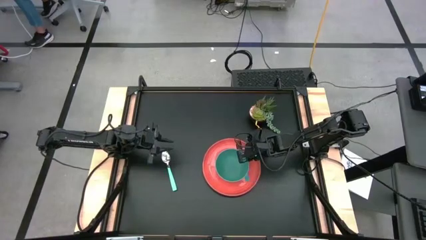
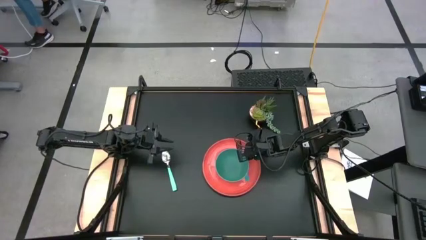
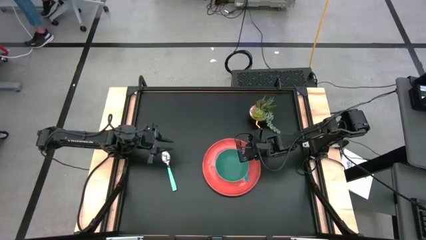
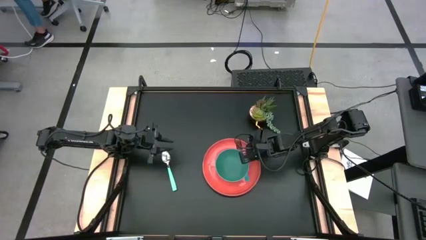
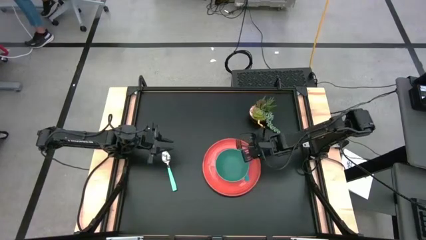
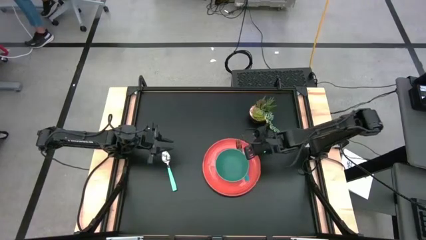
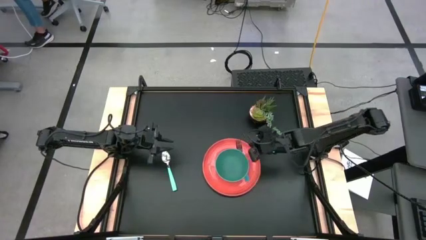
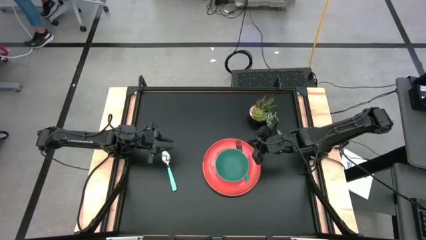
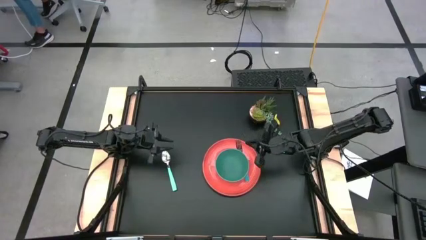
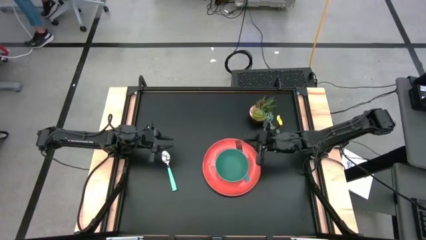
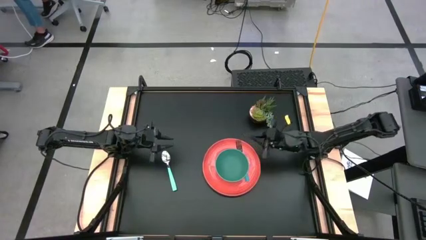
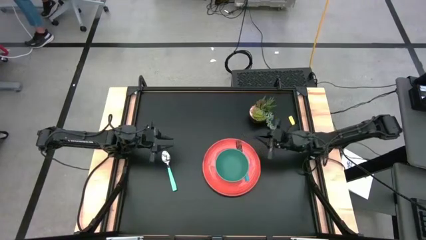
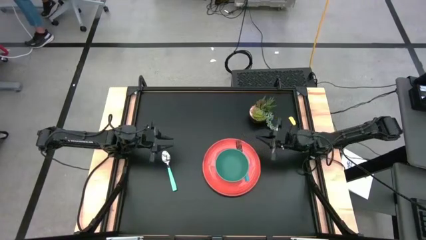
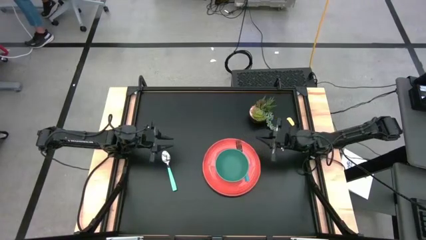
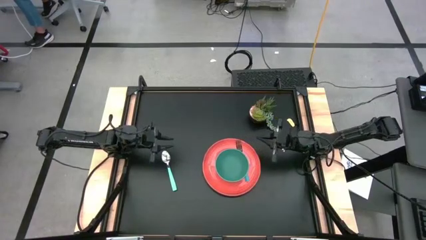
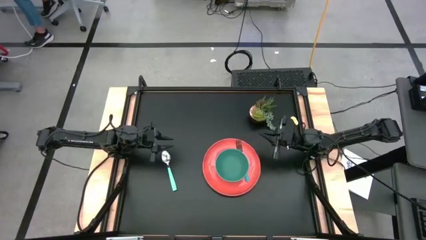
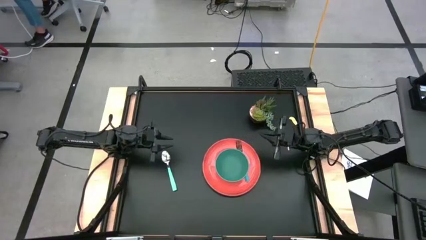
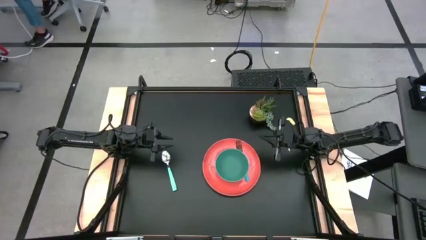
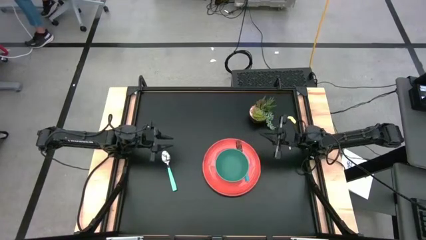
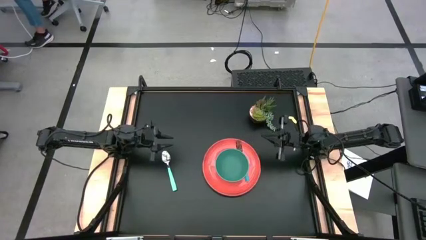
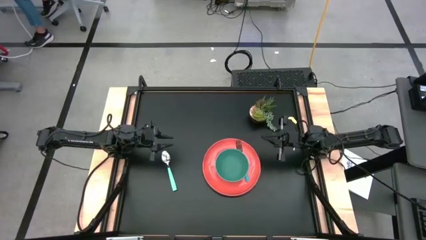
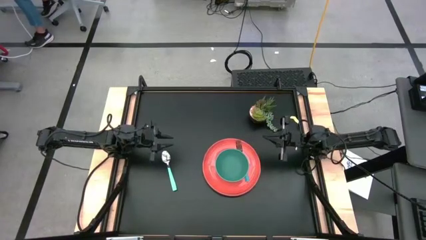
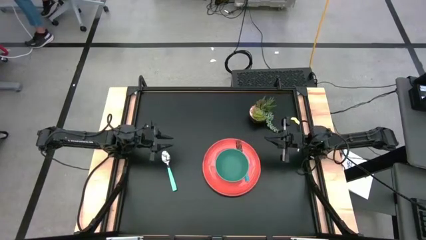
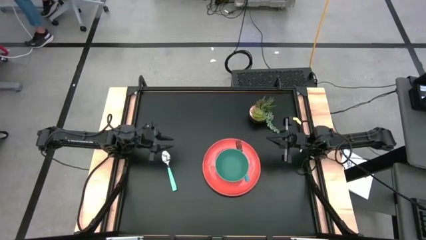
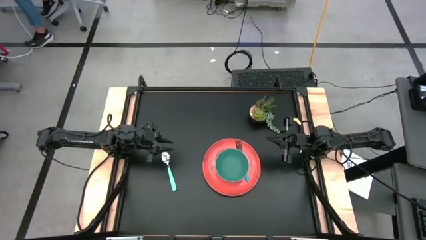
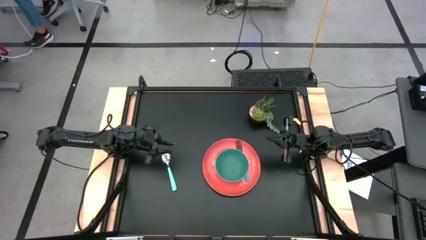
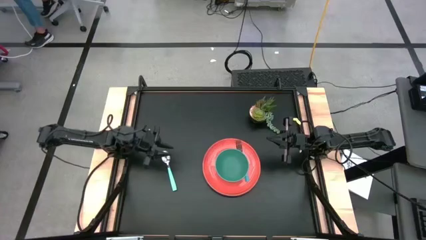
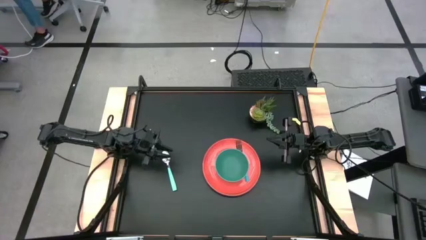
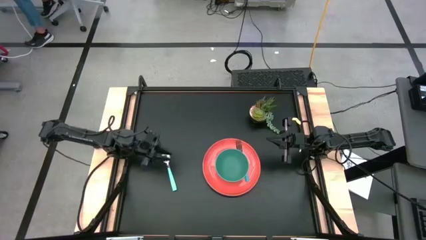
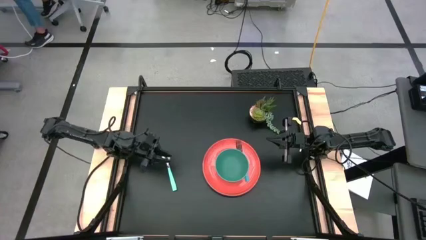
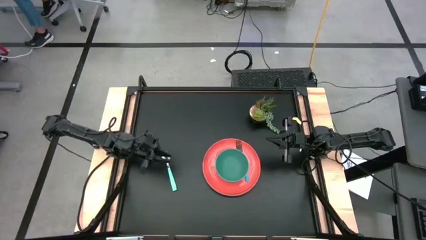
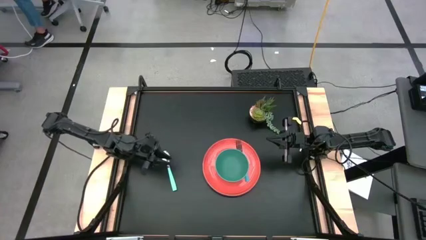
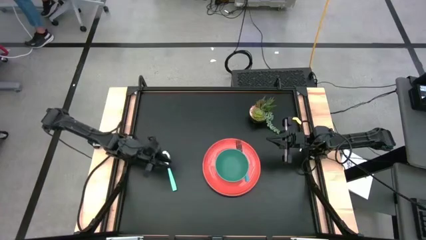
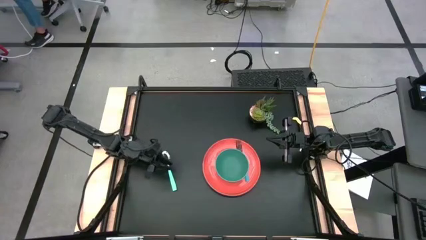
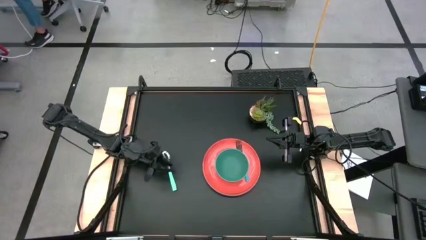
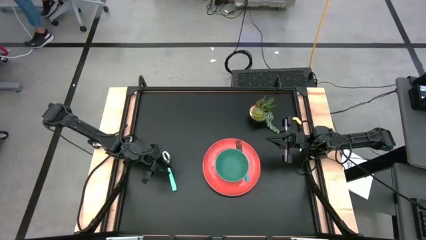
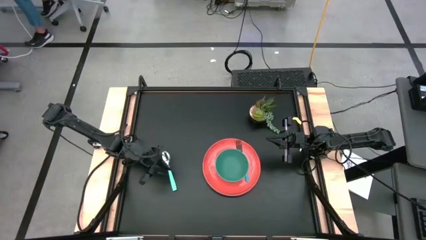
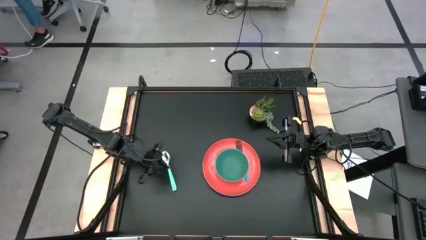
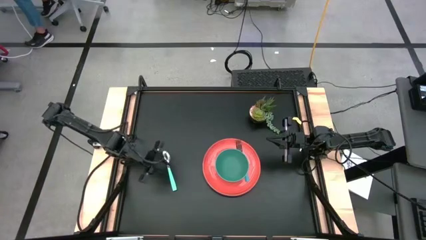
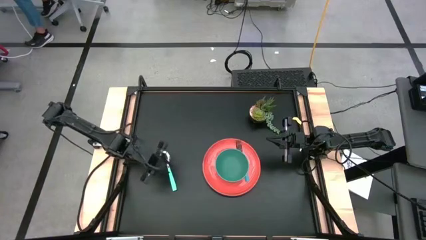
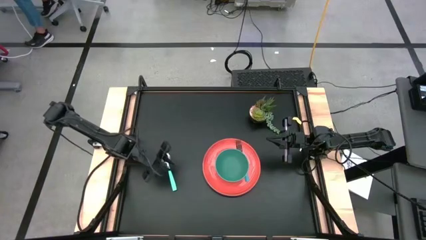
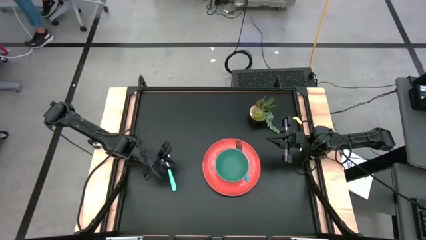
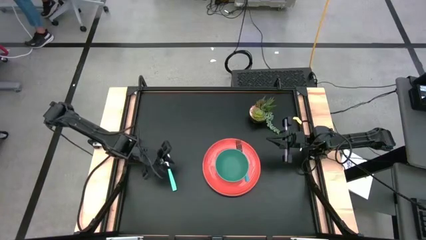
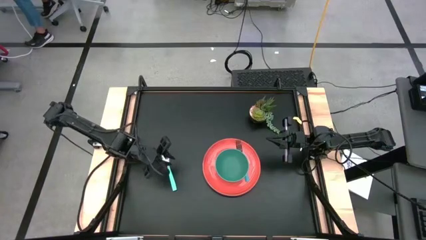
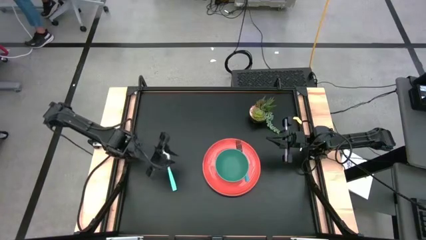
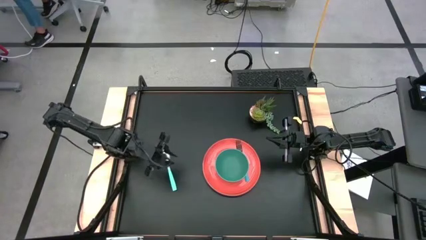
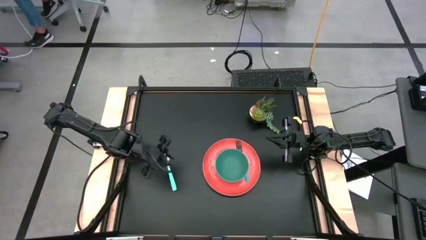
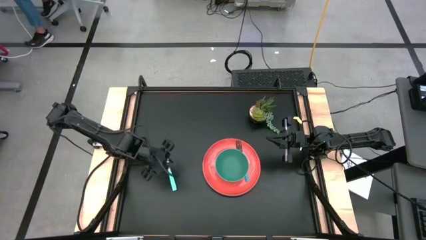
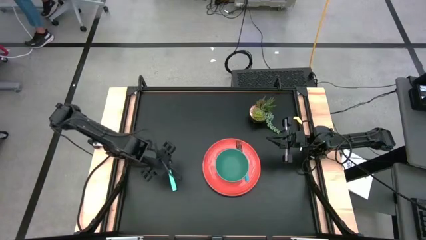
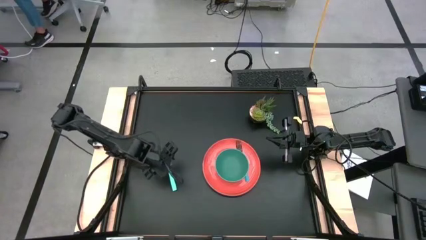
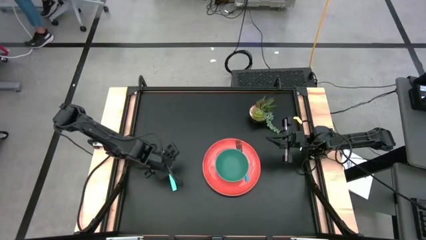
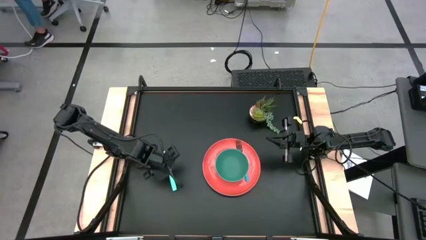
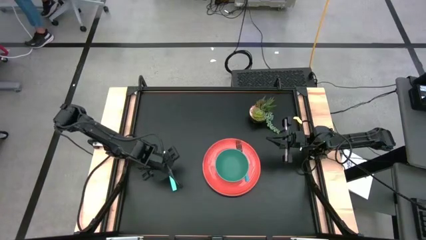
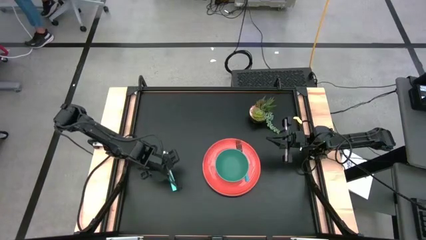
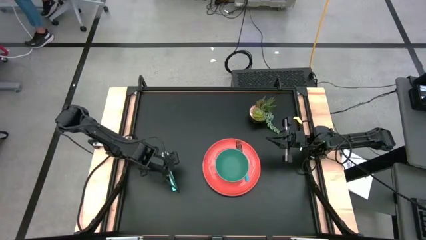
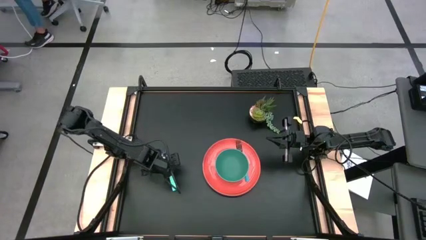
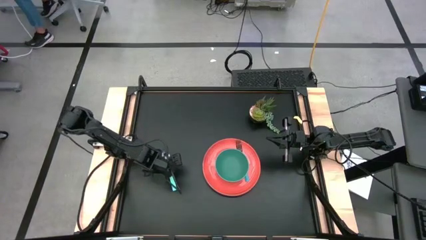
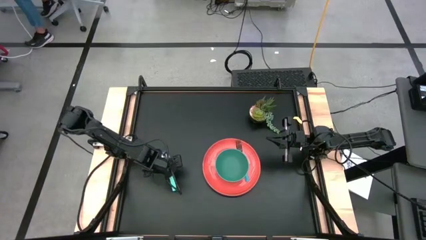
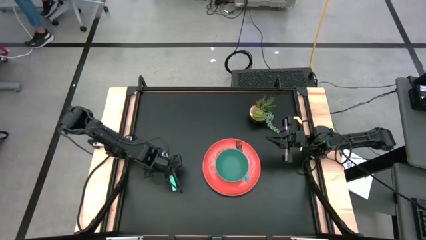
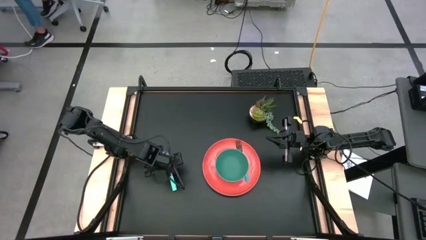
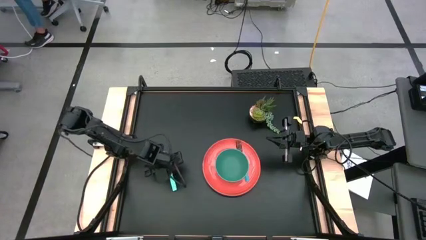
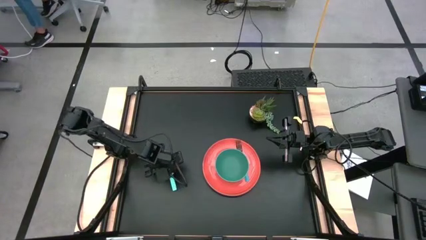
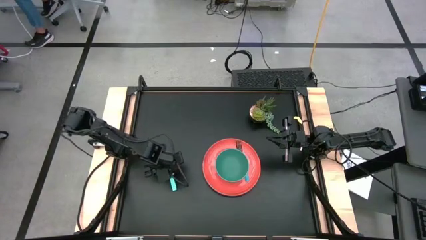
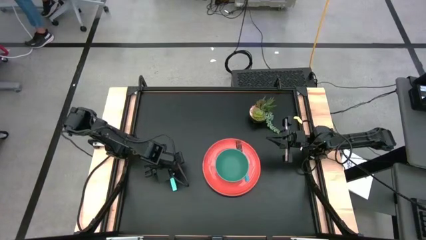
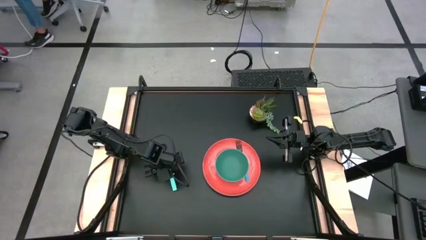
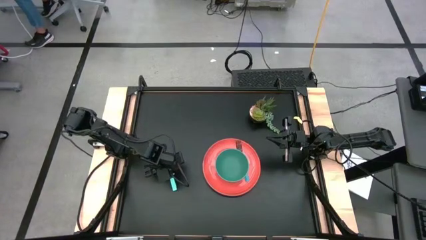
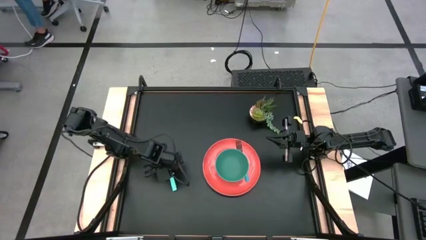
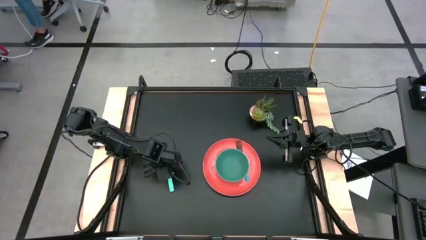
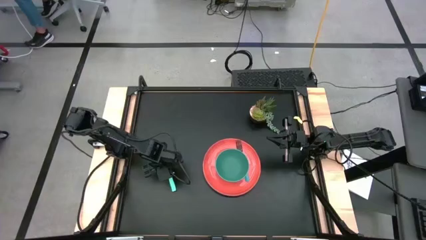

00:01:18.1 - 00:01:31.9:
Task: Set table place
Put the blue spoon into the green bowl

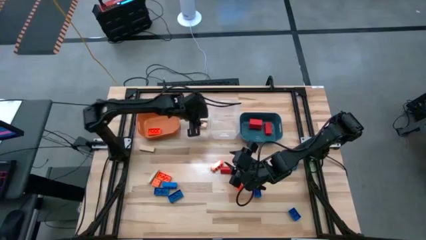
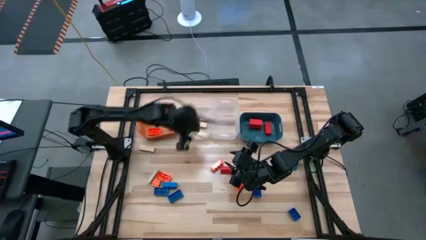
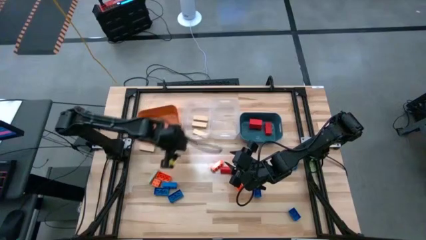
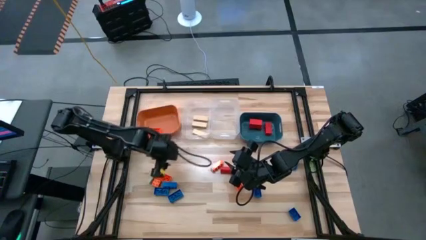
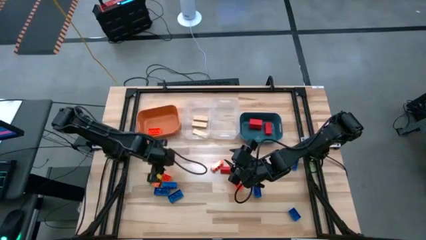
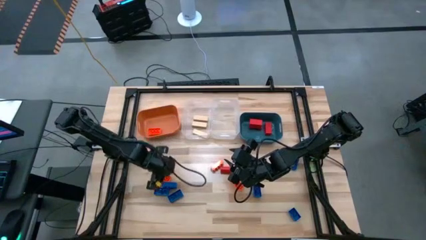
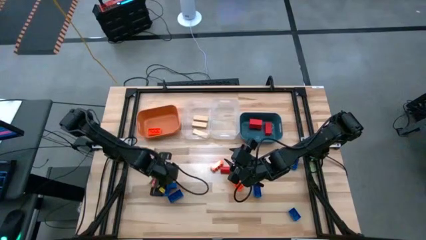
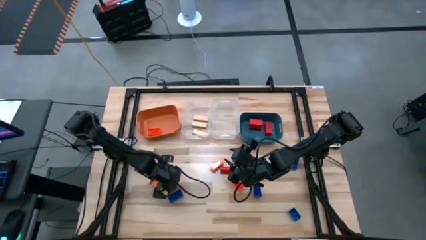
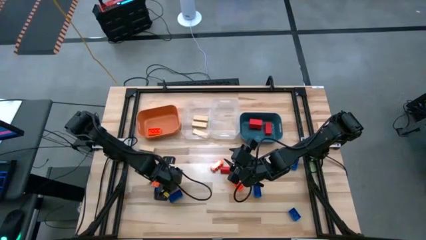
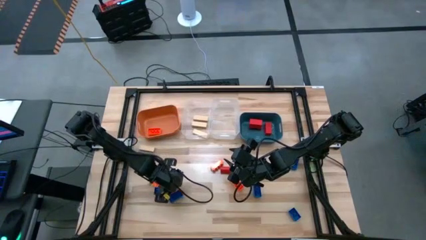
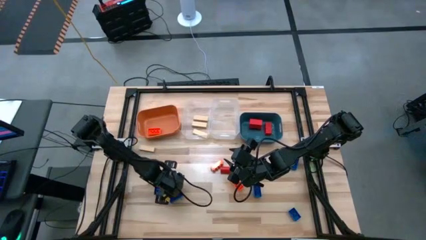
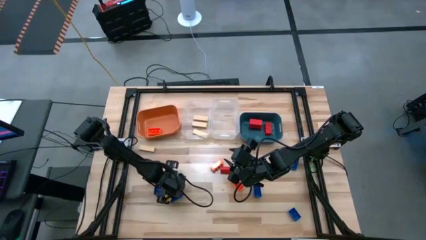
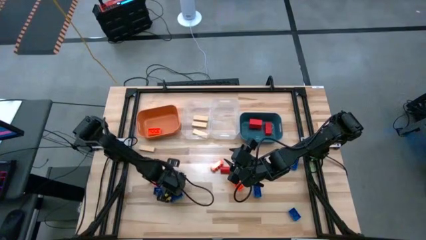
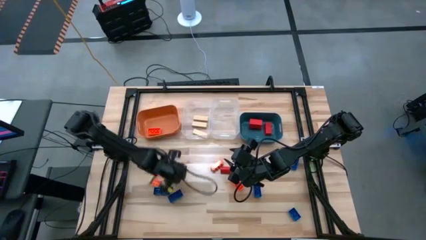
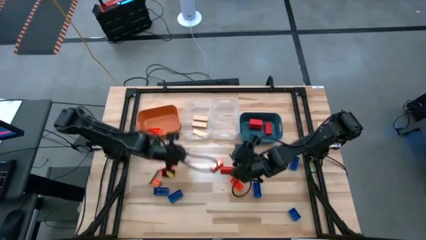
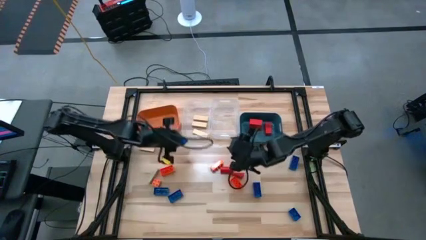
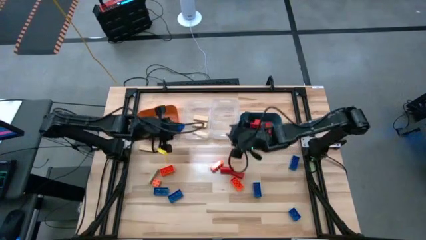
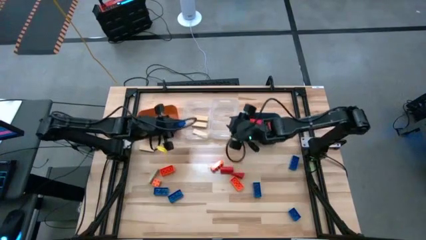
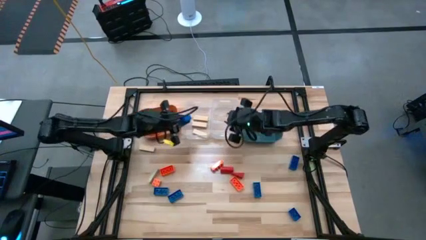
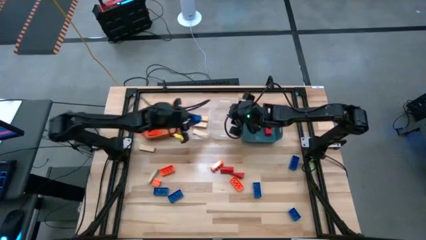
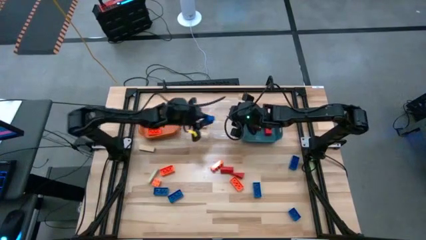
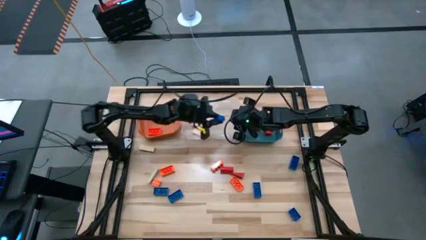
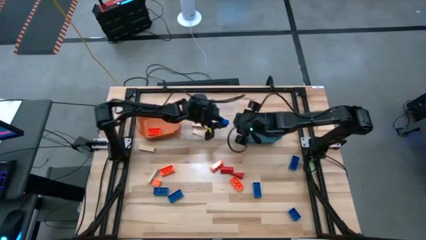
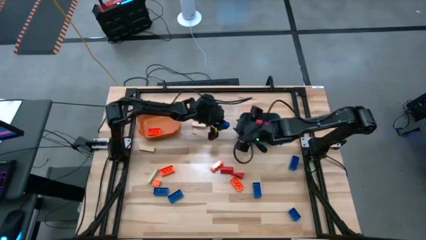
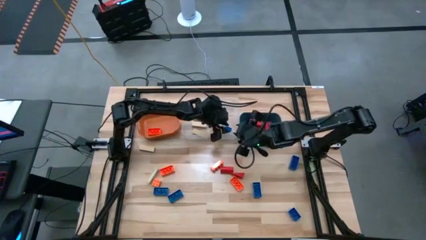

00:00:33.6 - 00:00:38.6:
Task: Sort blocks
Put the blue game piece into the right transparent bin
